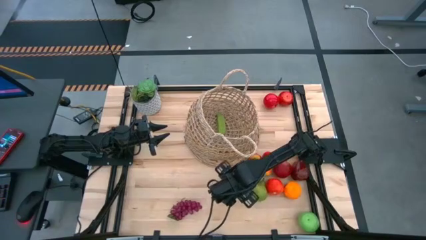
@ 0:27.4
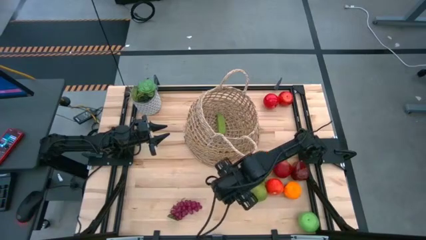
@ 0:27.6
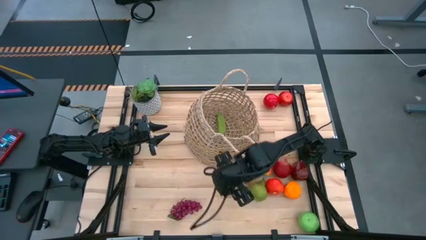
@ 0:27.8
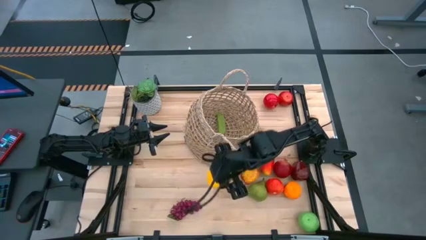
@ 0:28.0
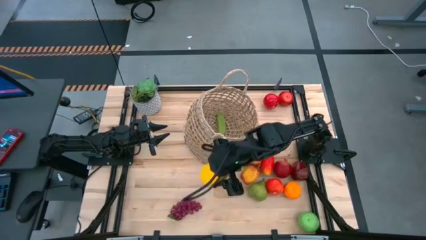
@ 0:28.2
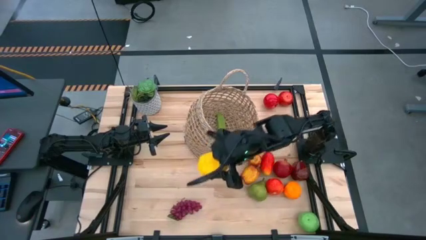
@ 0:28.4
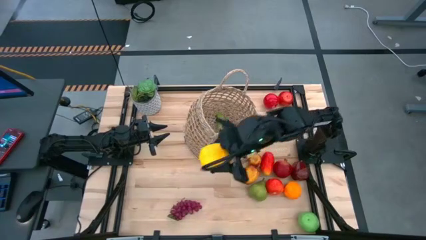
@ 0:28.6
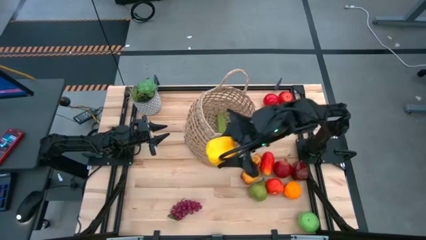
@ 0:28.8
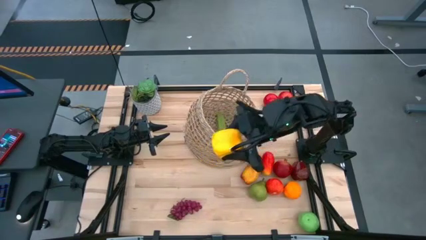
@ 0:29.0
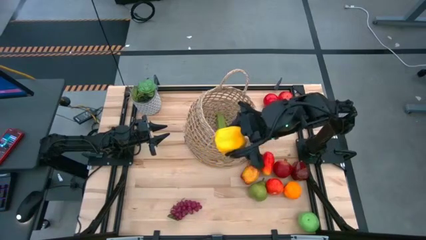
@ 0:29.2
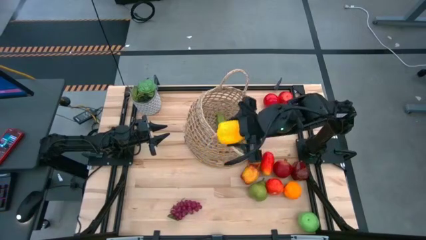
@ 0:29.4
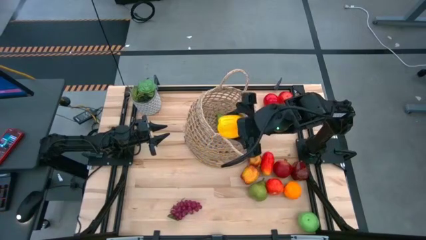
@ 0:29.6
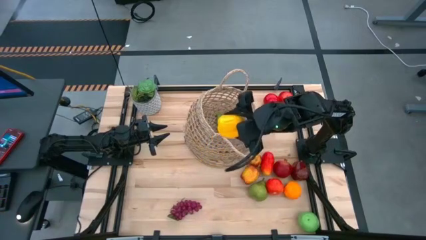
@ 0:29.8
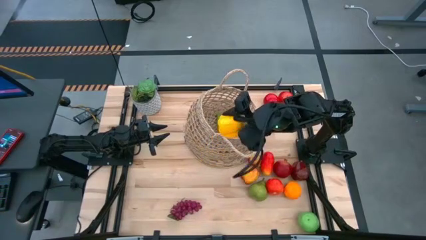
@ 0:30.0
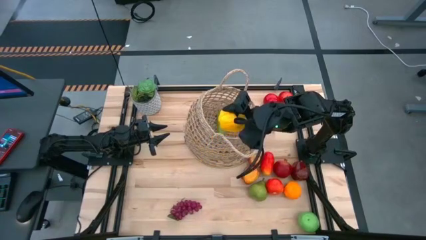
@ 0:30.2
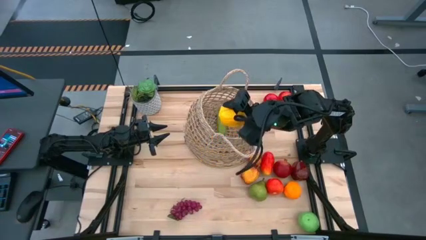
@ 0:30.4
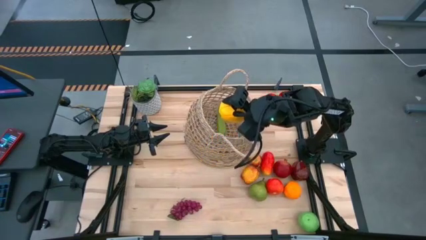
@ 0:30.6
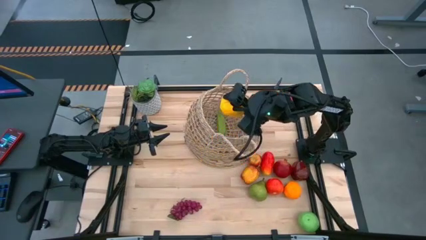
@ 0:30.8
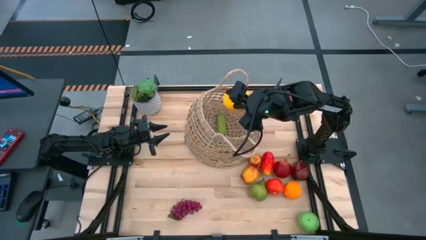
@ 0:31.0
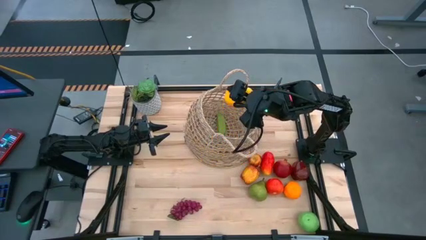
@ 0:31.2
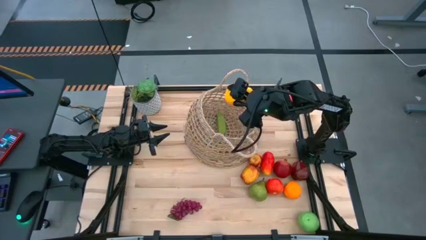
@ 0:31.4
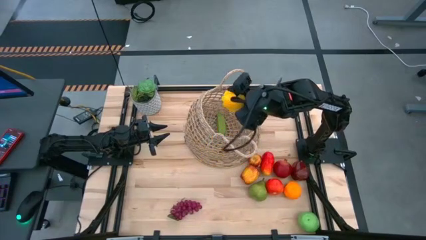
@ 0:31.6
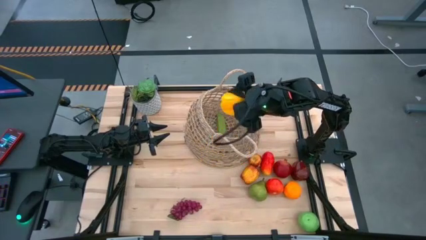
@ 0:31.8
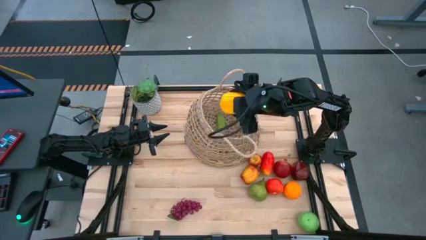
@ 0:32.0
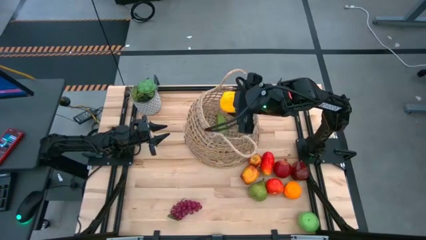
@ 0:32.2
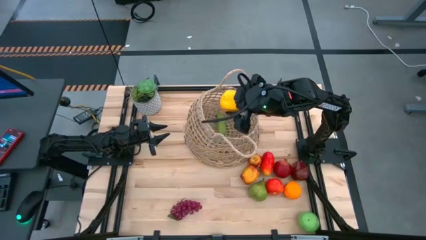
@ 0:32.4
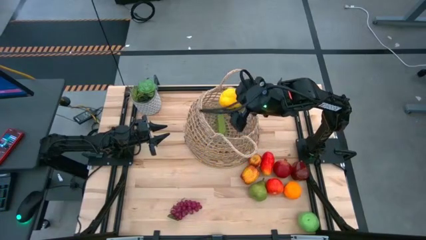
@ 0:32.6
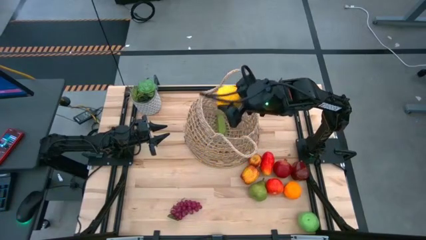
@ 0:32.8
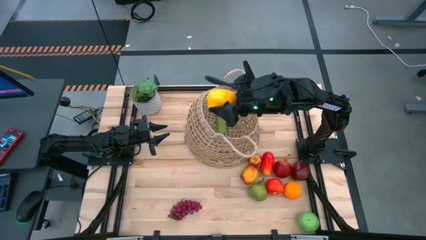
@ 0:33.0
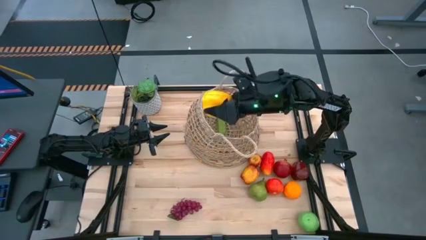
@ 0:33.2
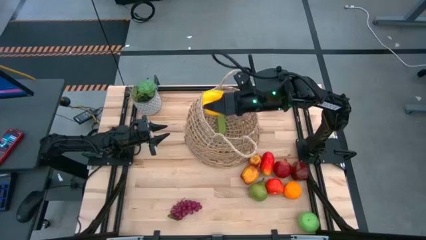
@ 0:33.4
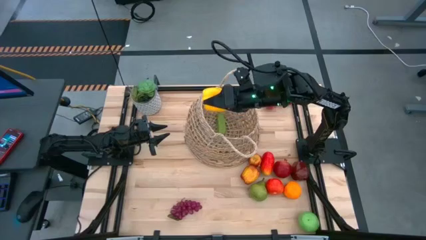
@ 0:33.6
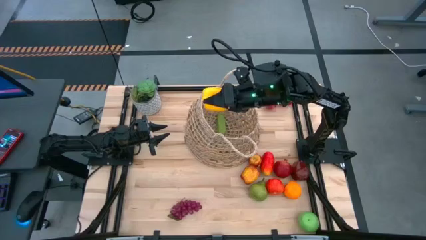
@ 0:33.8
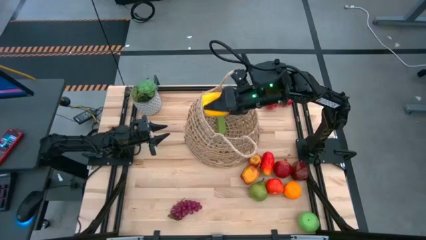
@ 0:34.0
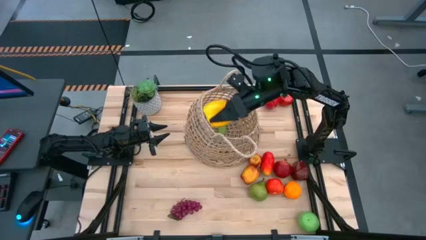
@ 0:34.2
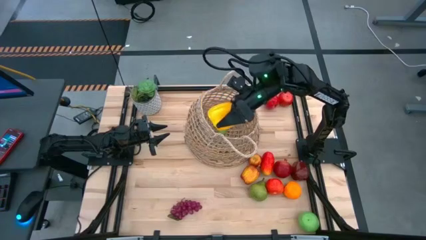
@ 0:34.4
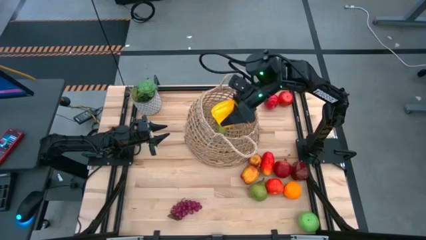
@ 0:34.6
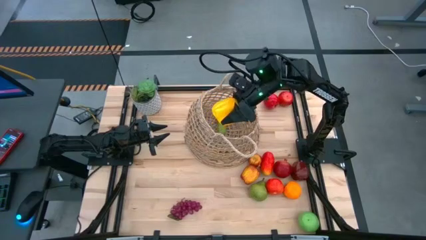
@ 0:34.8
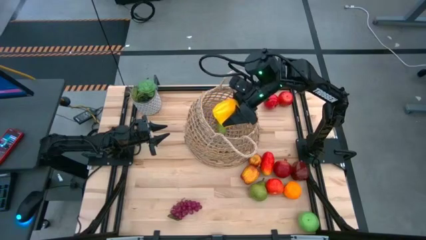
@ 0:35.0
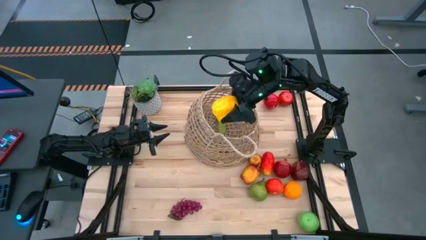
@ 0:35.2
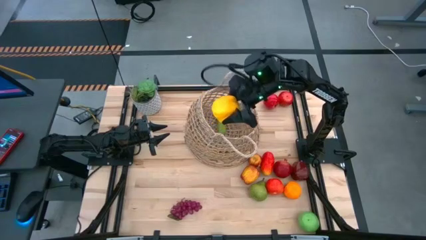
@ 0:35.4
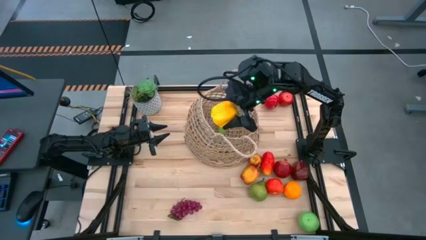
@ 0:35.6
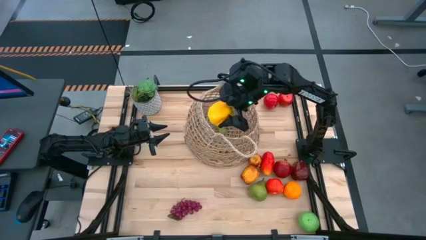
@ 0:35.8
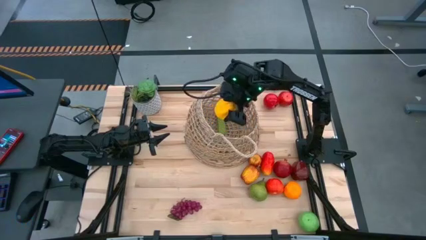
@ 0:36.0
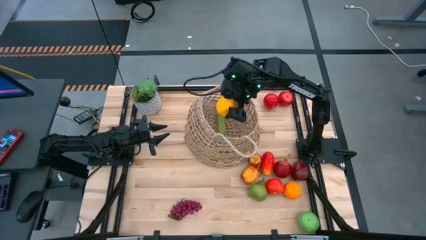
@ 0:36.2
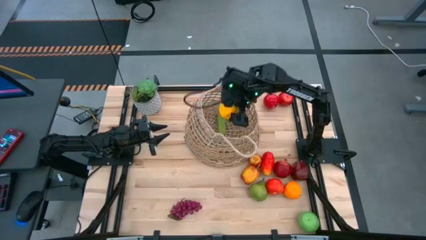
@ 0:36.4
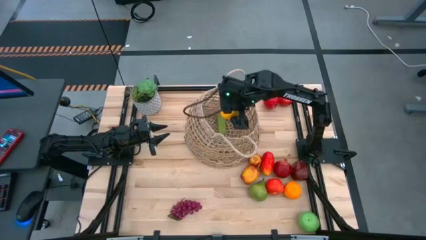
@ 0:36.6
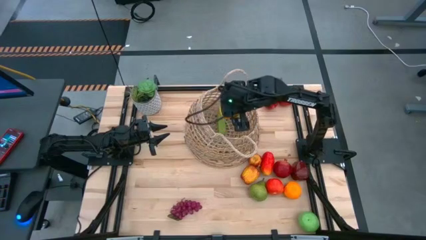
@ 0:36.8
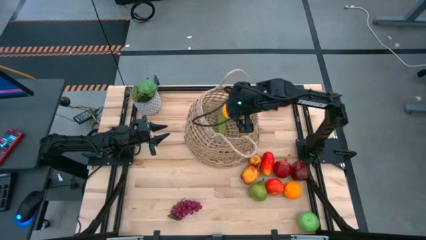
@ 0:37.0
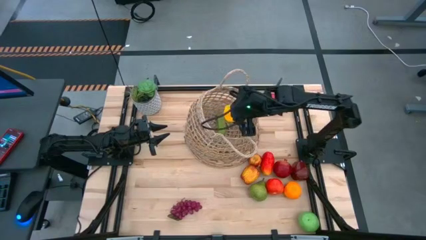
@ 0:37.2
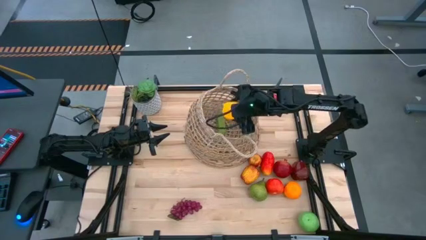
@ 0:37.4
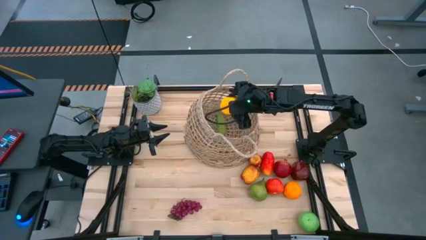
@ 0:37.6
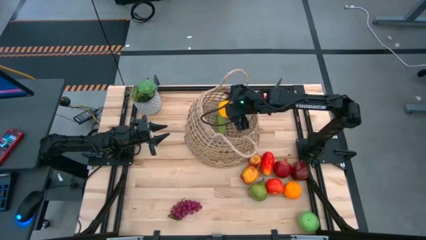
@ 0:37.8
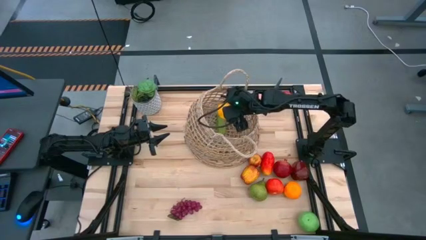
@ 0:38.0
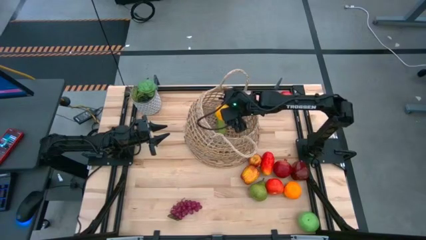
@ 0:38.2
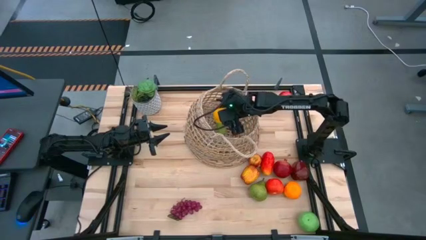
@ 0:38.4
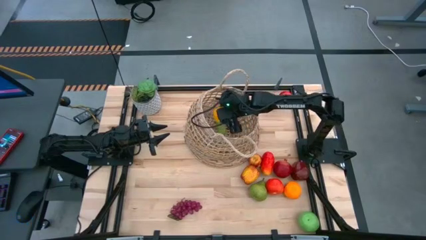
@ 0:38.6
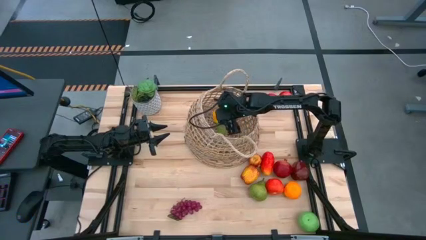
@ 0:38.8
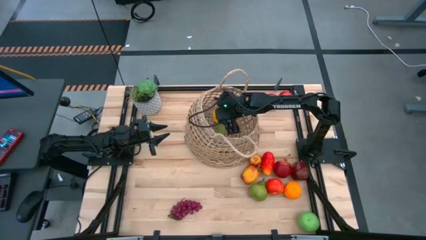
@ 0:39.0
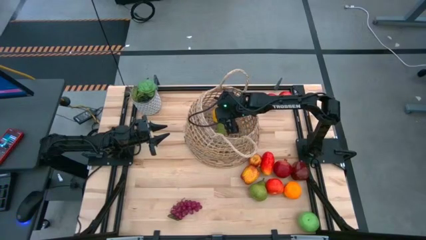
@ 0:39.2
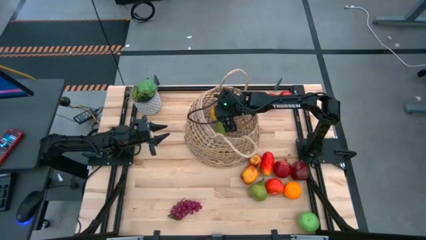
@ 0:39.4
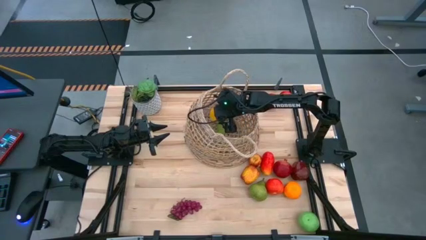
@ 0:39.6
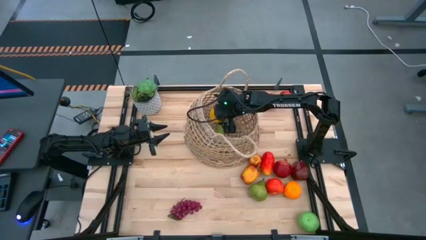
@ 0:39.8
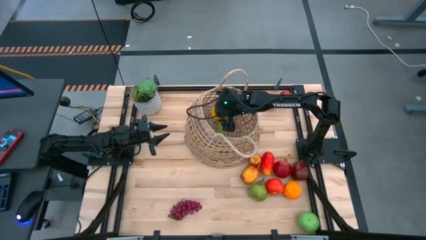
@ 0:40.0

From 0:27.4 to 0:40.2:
Task: Build produce basket
Put the yellow bell pepper into the brown basket
